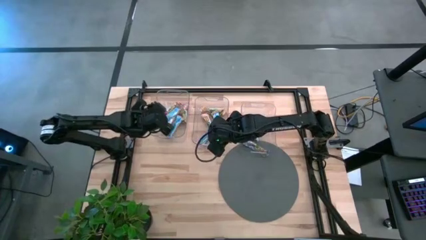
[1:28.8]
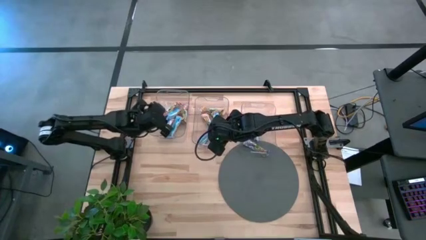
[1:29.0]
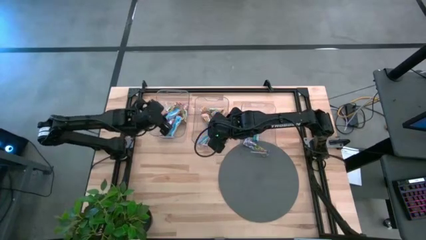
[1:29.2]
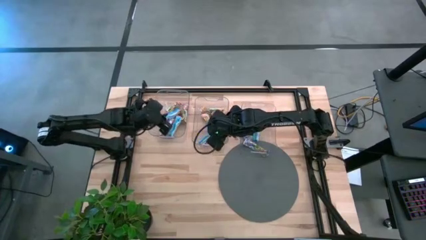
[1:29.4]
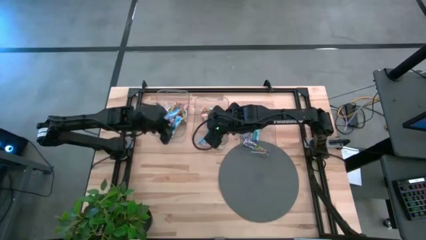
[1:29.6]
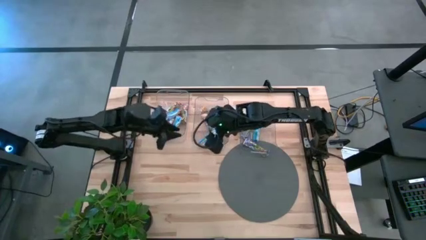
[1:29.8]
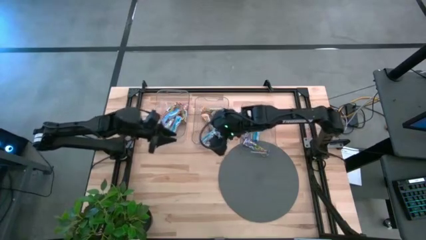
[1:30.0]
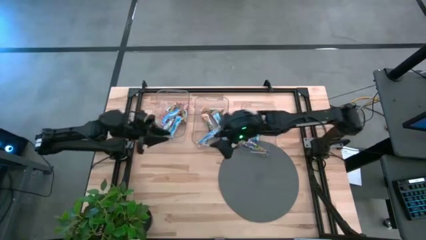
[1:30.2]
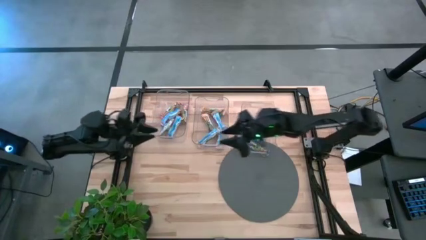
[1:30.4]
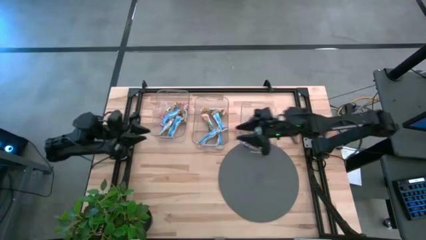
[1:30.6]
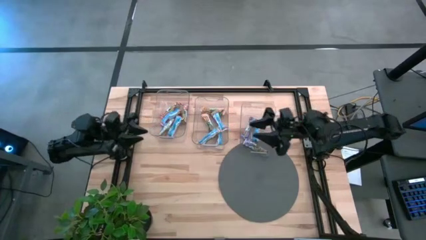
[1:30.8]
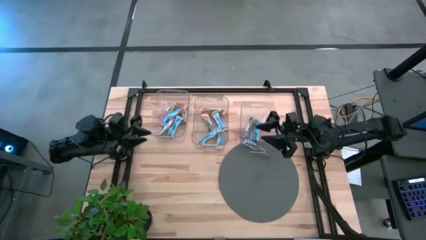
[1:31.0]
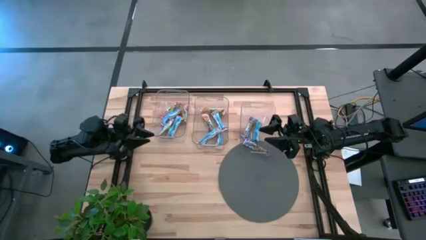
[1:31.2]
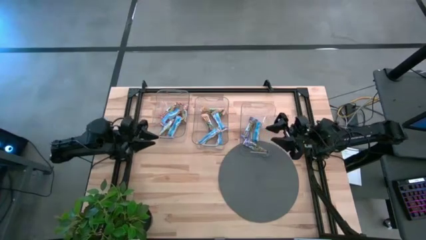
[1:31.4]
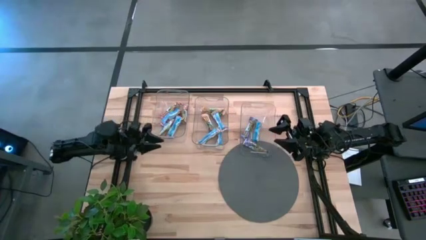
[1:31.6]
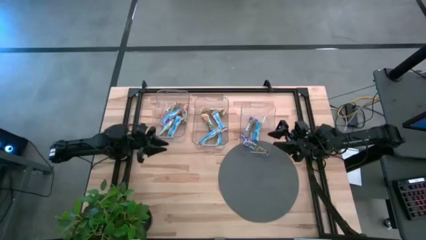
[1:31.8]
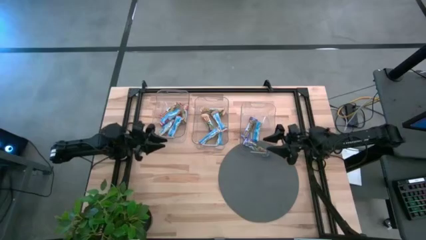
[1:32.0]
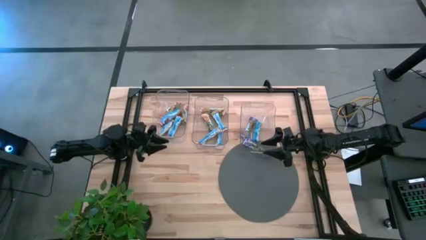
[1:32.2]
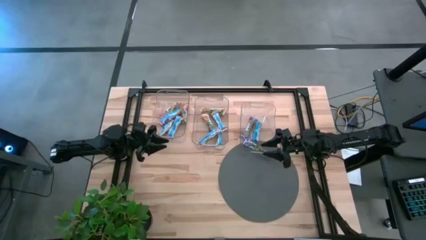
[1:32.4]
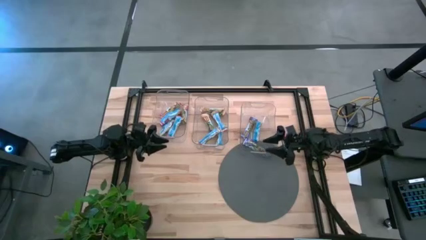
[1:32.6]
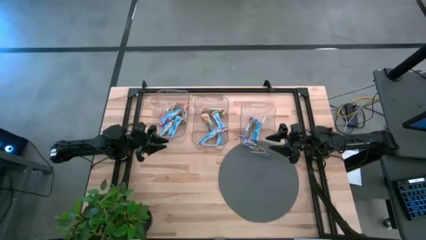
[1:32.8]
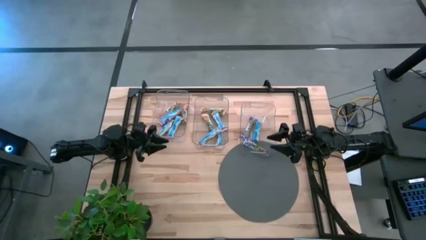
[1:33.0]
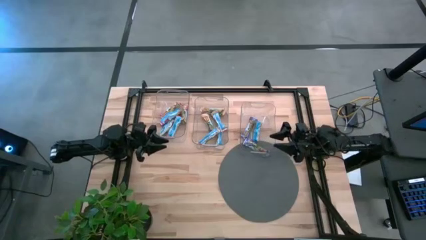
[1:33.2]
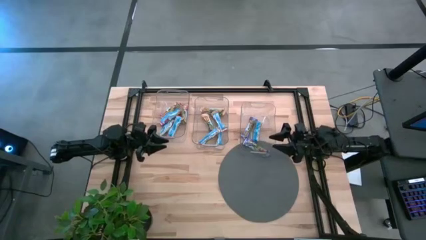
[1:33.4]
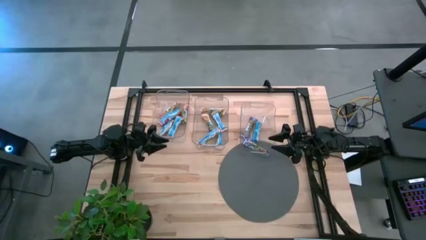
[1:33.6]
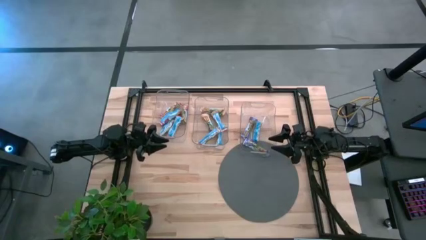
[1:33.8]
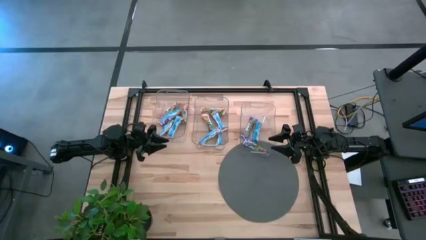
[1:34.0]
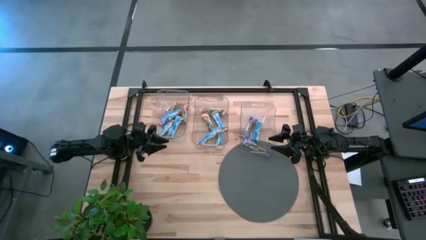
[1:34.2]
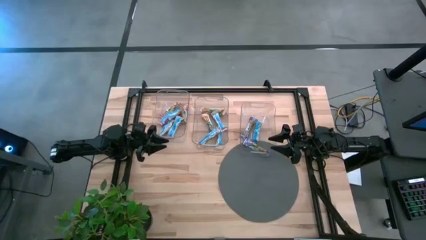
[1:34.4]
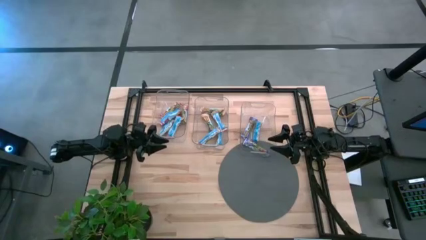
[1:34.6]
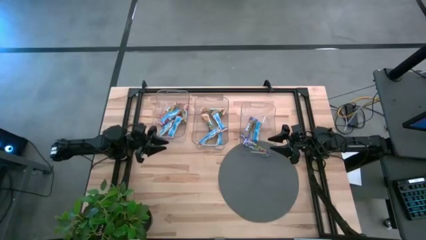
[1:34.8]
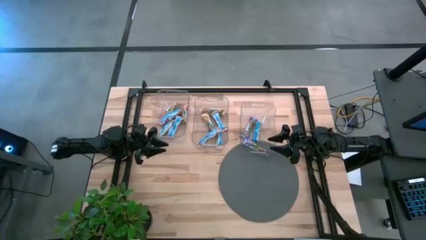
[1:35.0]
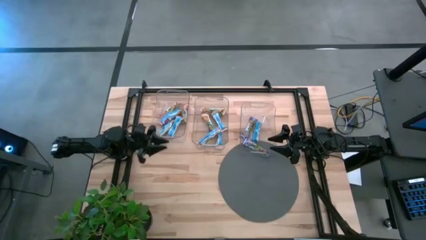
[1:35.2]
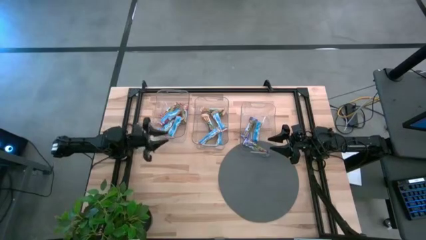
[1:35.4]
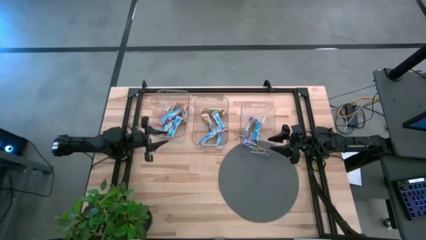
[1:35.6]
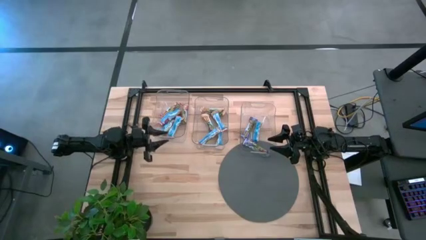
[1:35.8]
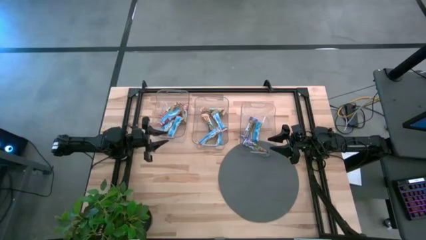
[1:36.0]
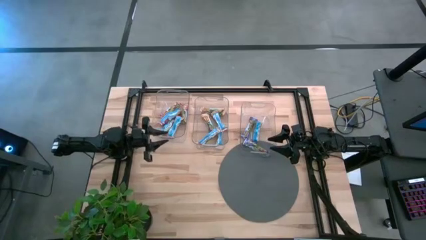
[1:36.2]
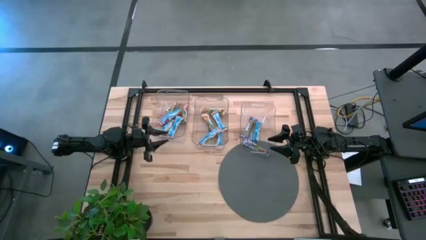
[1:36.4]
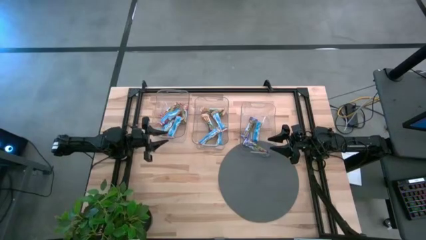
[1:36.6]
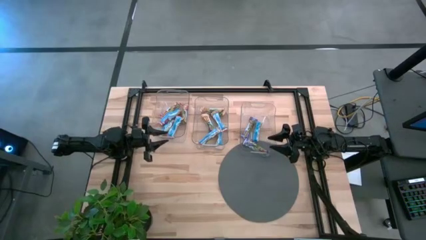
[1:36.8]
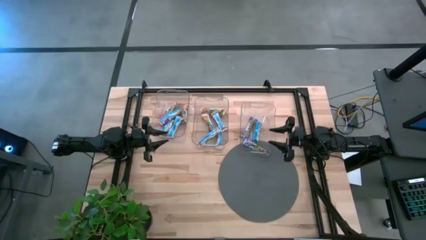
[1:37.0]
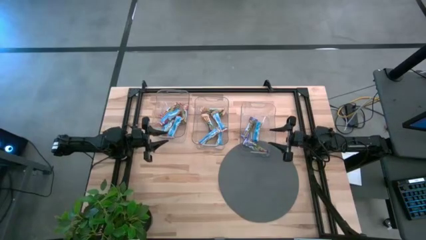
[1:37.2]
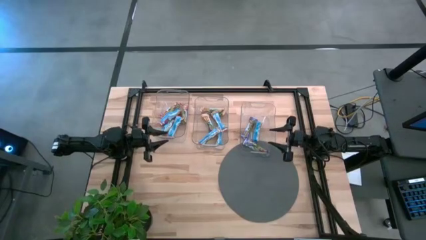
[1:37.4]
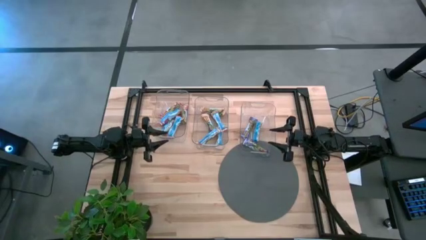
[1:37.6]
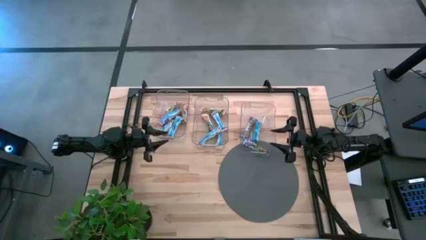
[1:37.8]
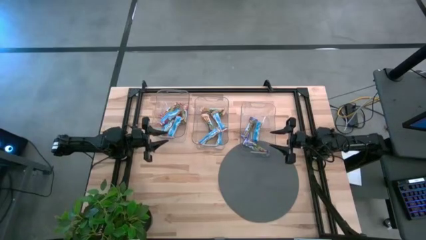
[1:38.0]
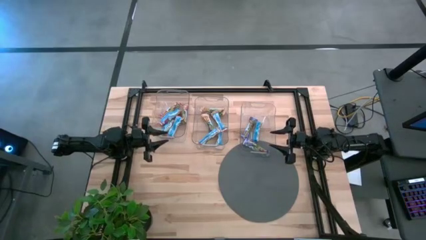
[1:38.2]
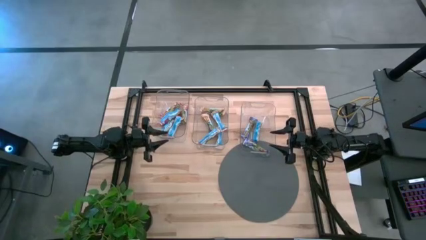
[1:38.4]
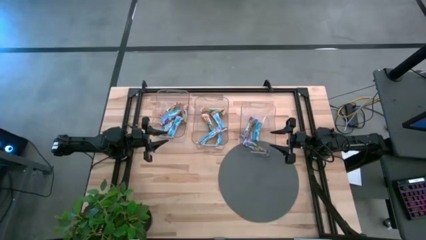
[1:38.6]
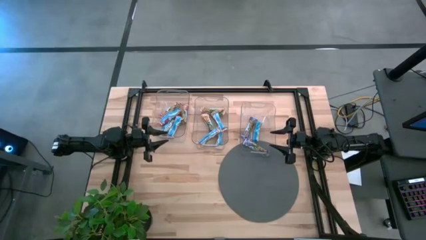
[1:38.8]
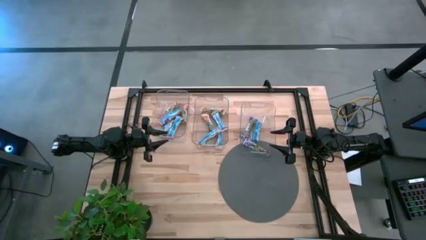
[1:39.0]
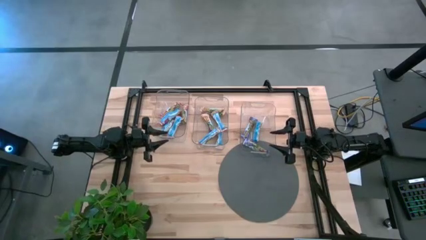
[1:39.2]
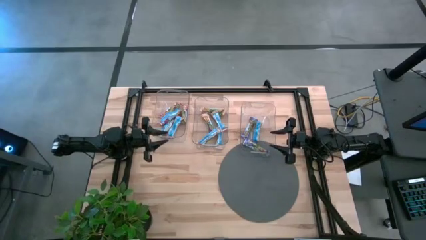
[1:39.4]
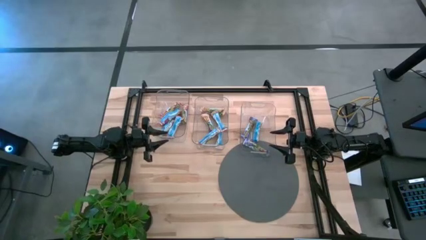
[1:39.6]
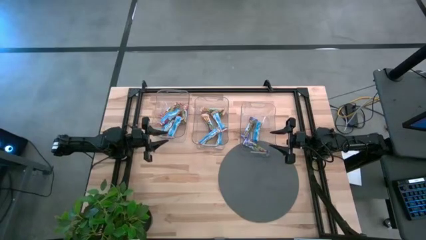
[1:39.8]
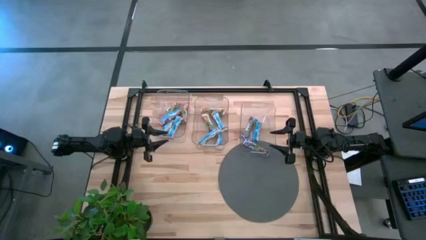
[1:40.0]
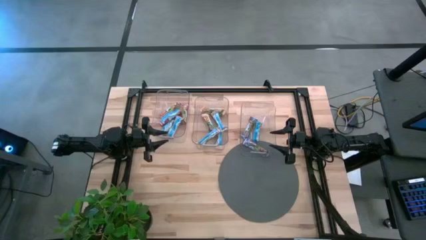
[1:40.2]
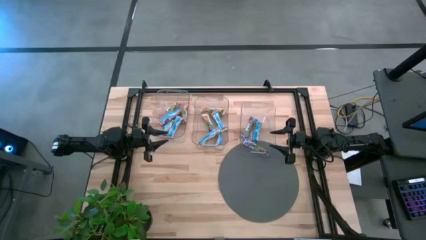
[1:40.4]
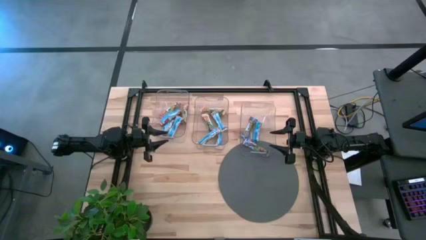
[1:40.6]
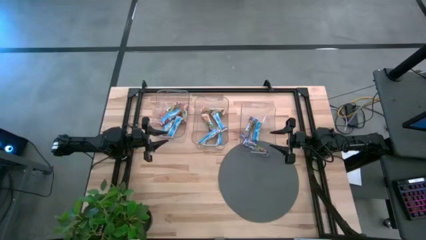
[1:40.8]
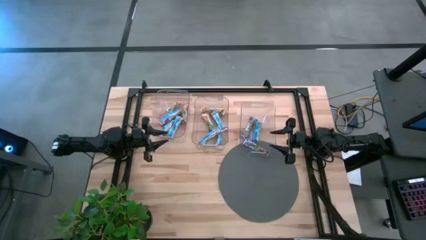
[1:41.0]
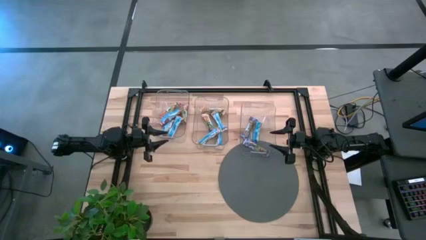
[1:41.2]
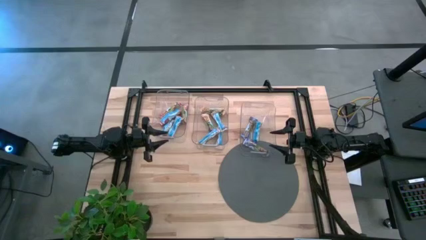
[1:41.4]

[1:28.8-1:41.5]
Task: Pick and place Granola Bars by type
Return to Home Position
